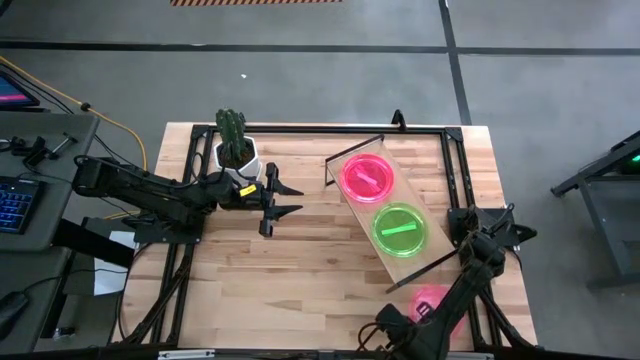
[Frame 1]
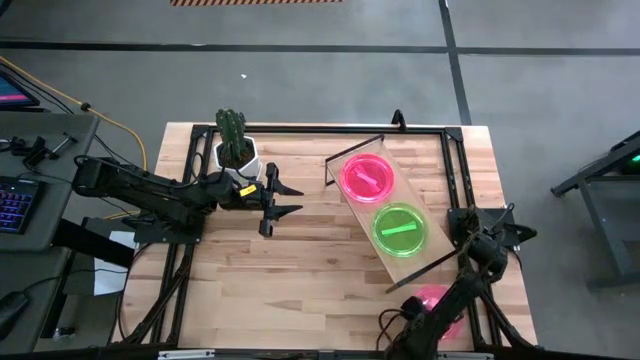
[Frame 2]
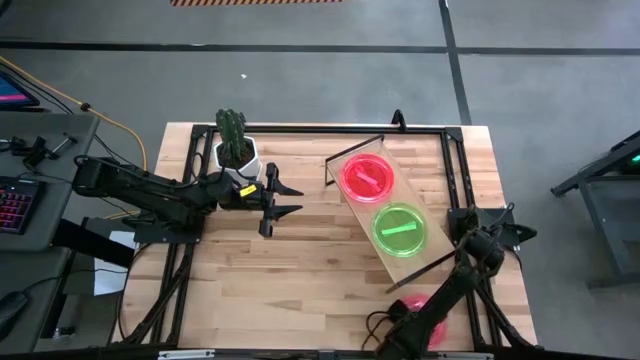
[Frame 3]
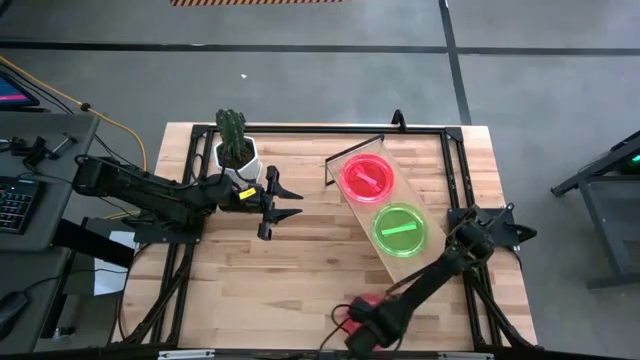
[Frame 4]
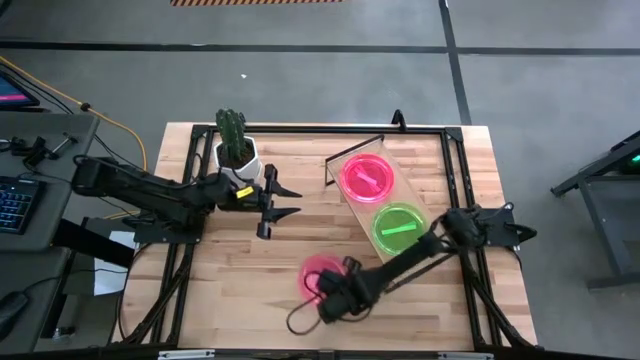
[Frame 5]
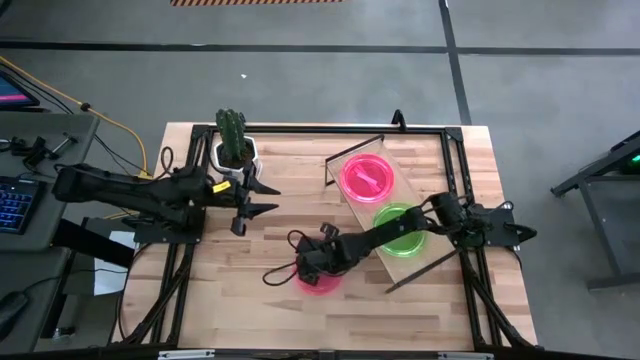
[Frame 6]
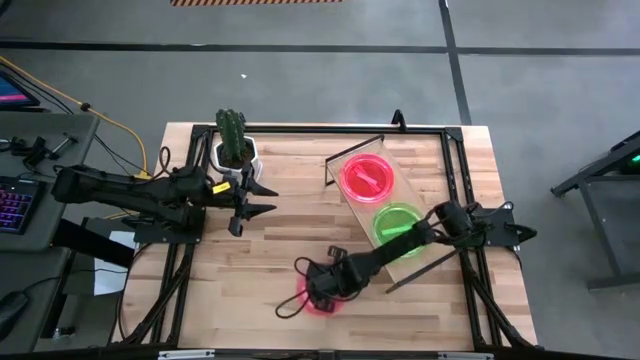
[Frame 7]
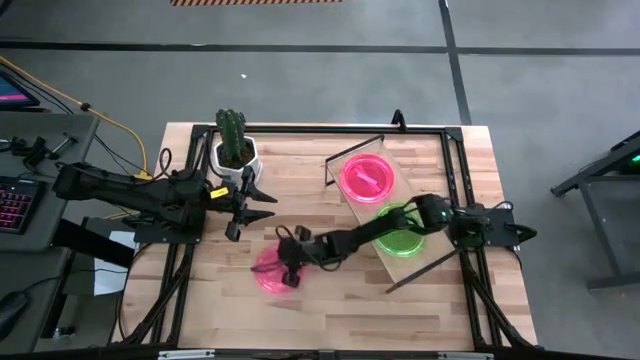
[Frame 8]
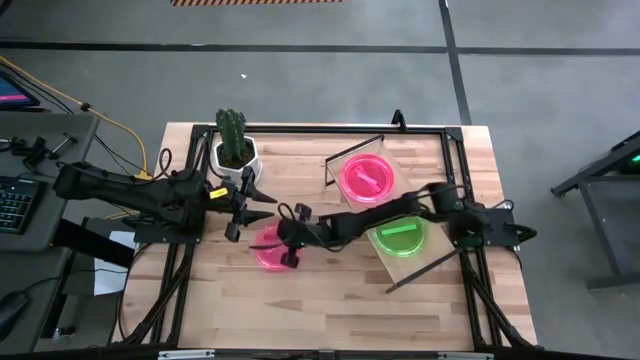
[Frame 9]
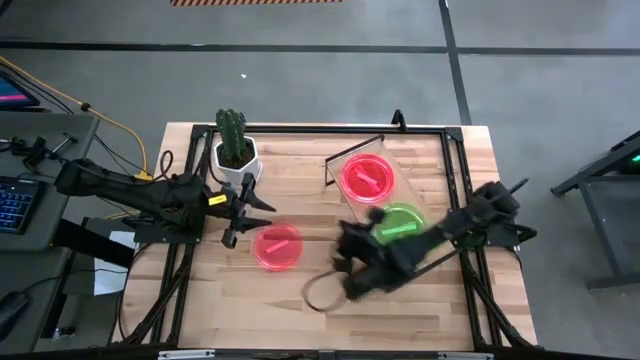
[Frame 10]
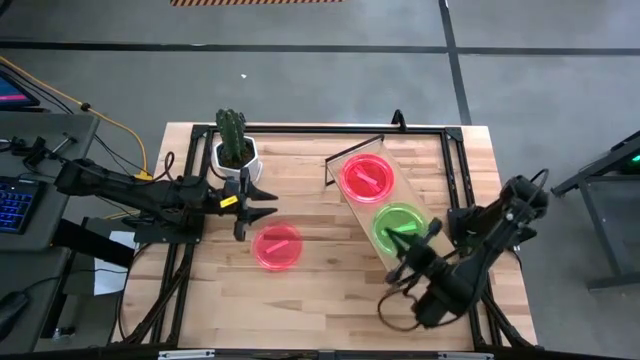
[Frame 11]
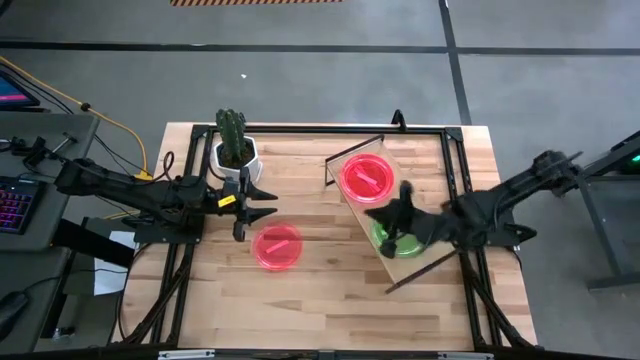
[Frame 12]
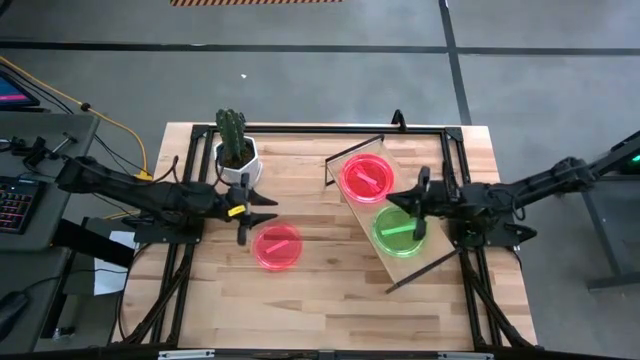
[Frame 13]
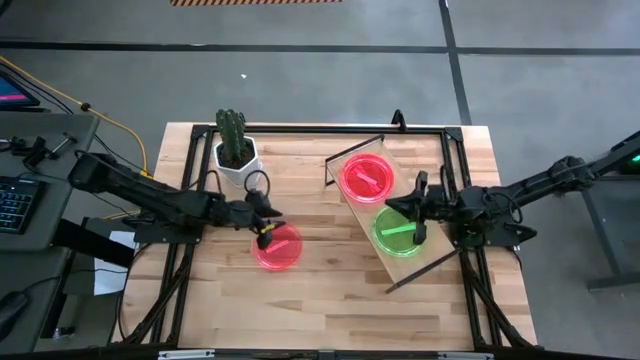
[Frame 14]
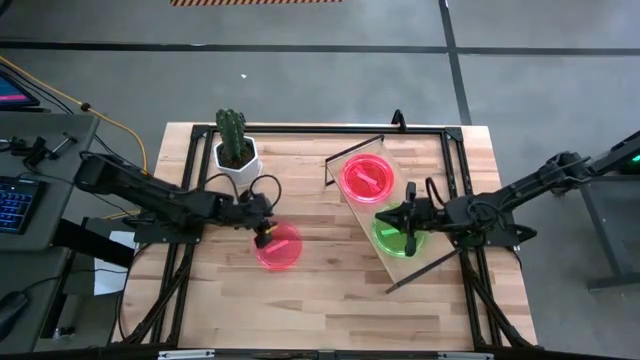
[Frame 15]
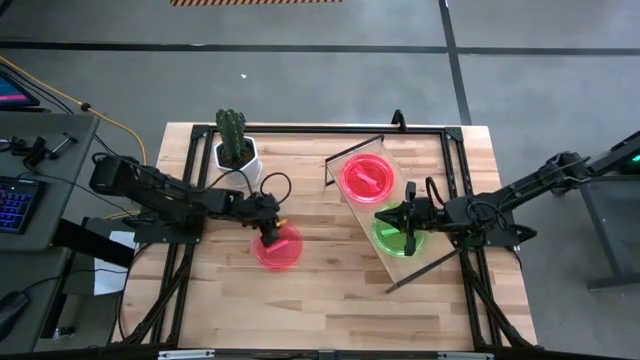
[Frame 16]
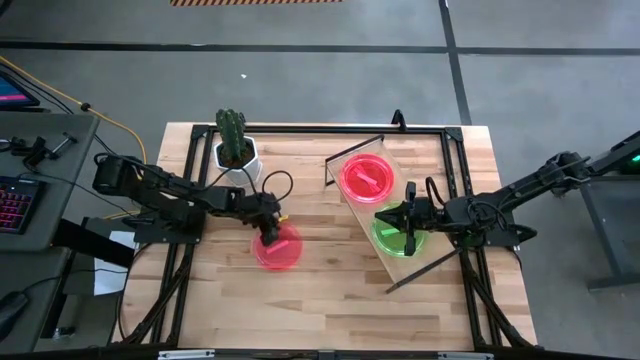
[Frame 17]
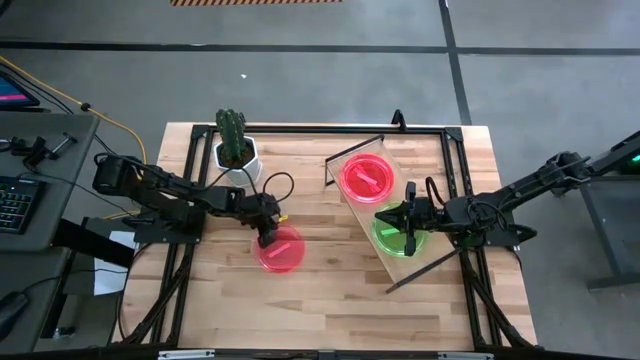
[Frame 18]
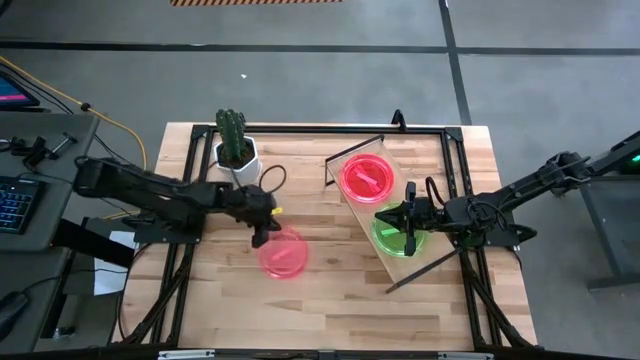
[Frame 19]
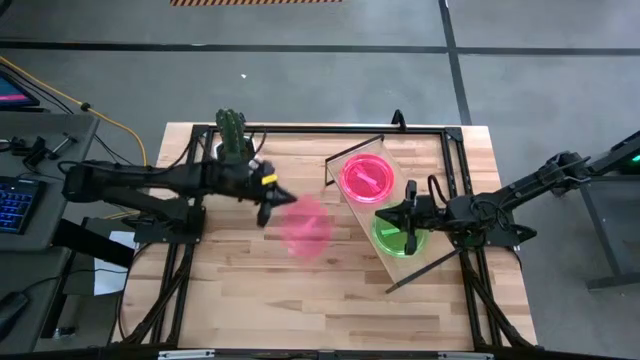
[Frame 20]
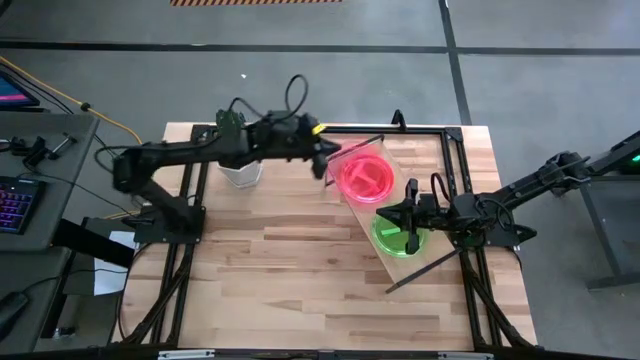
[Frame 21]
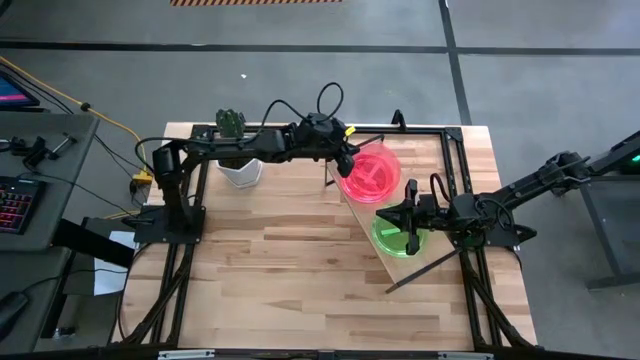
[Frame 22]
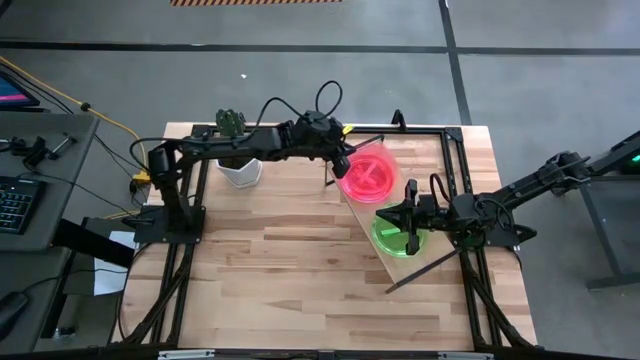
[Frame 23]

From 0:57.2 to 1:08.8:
Task: Place and stack plates onto a shelf
Stack the pink plate on top of the other pink plate on the shelf

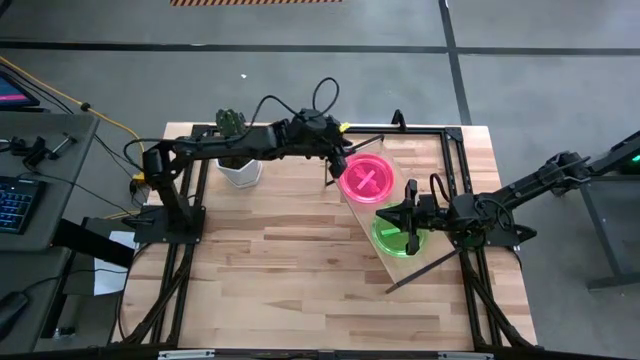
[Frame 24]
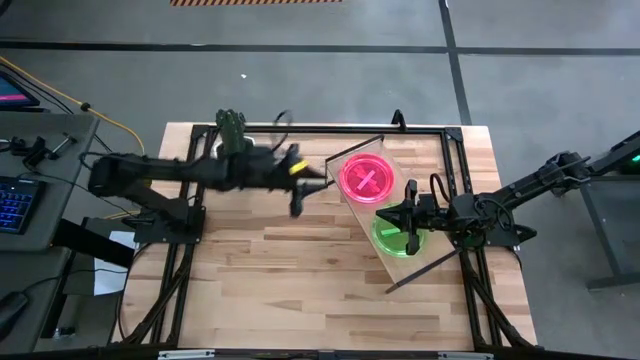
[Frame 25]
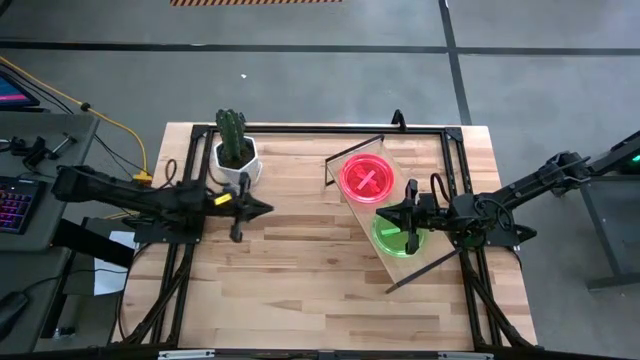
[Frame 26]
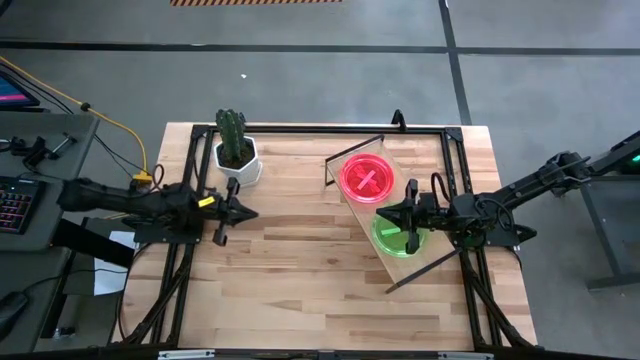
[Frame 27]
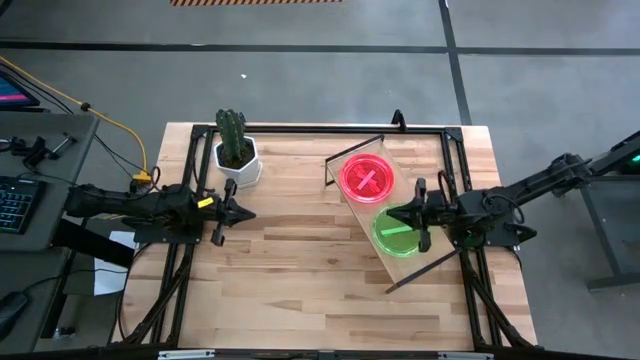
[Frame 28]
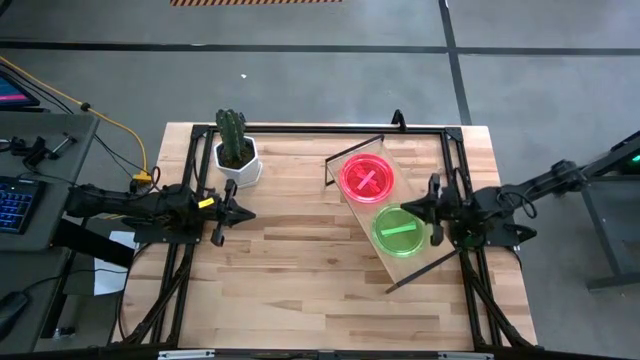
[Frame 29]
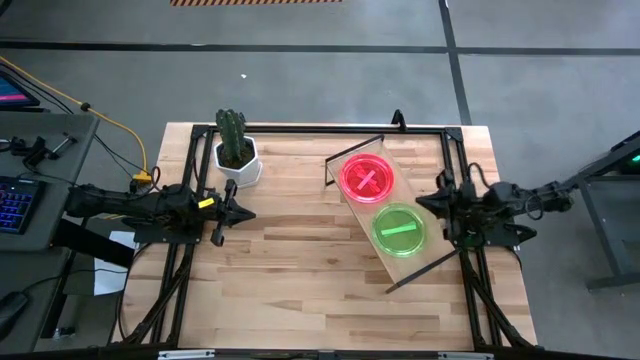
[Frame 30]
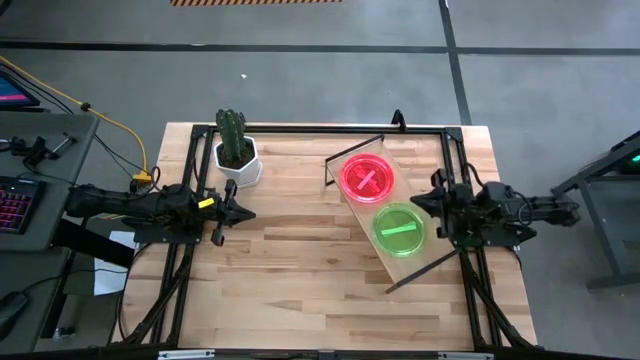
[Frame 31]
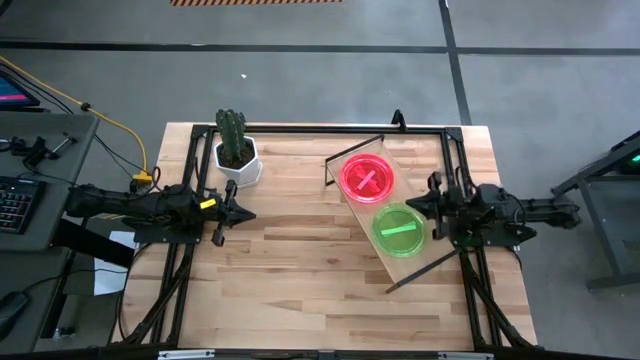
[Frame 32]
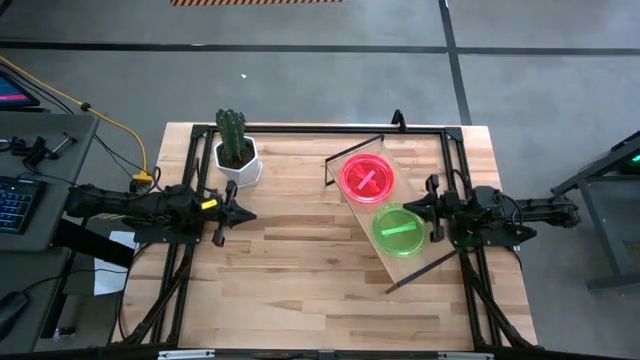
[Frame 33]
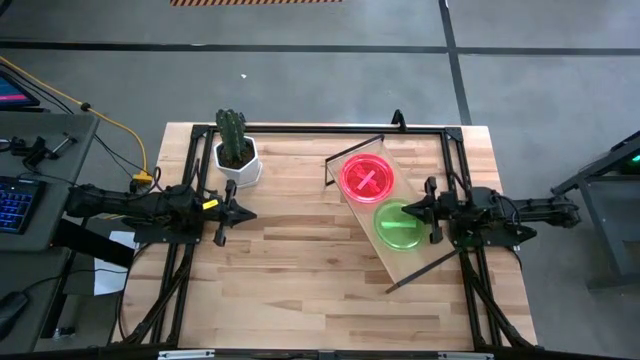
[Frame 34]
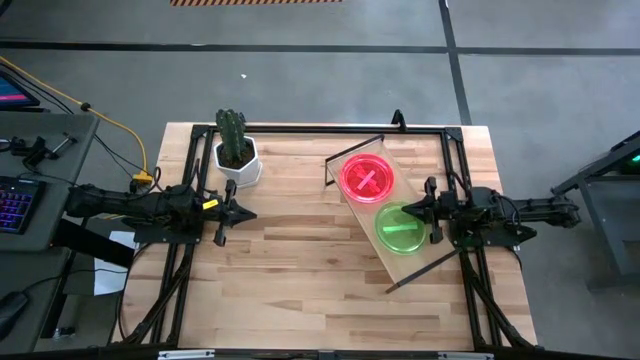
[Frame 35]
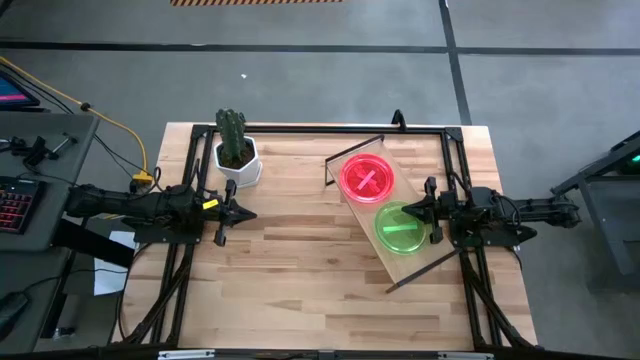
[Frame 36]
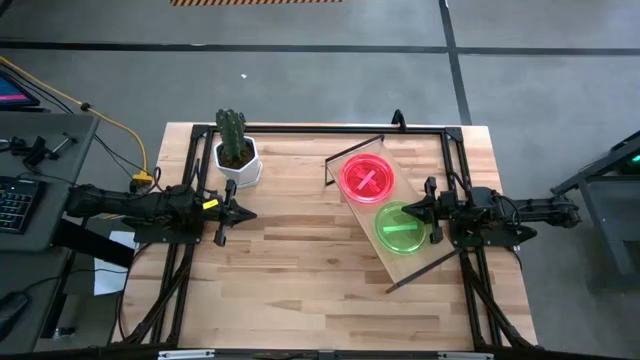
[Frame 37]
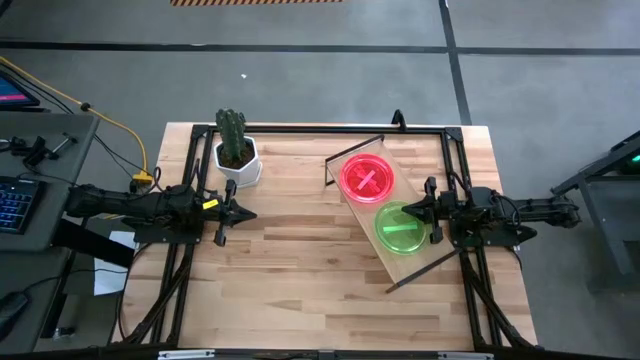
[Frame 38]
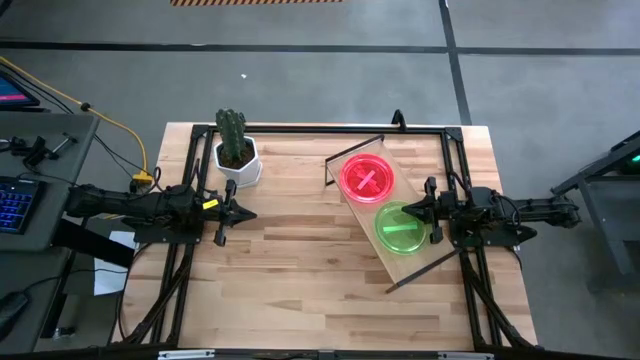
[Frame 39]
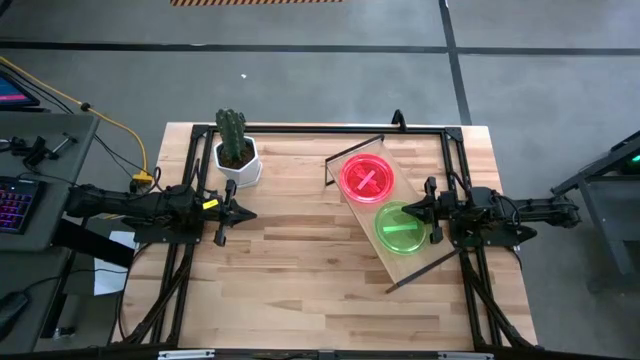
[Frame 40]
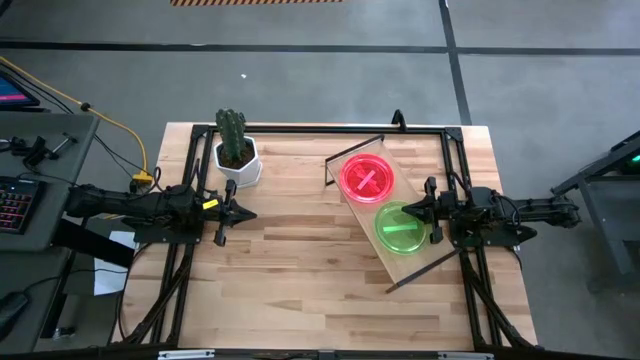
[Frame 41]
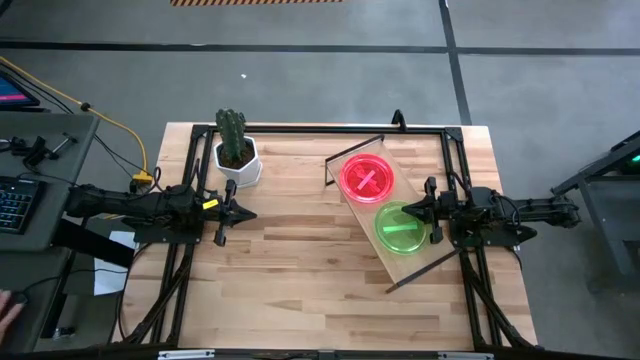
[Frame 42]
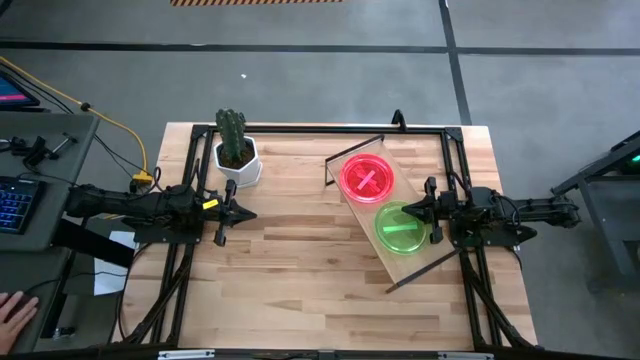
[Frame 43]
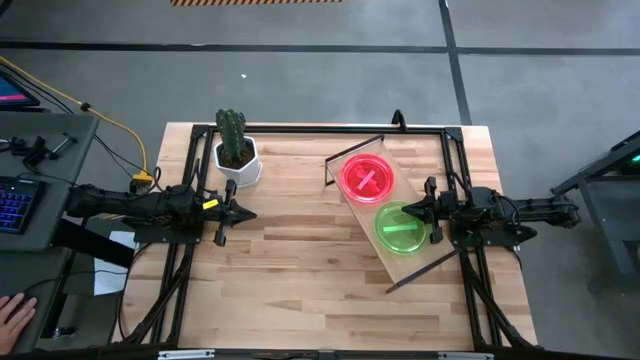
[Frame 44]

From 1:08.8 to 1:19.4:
Return to Home Position
